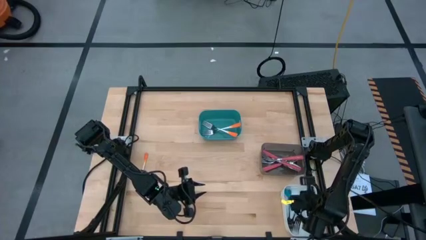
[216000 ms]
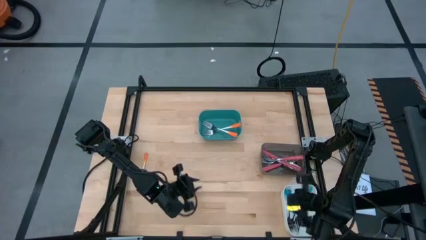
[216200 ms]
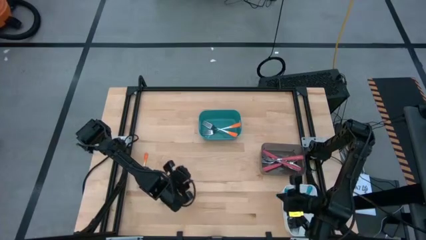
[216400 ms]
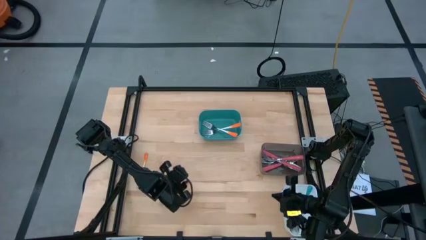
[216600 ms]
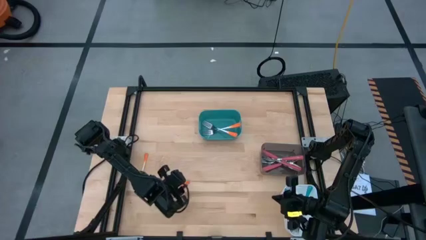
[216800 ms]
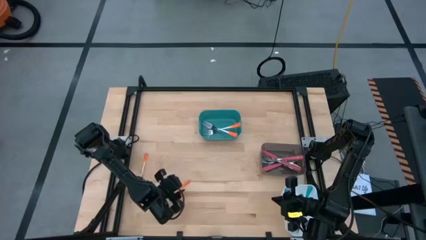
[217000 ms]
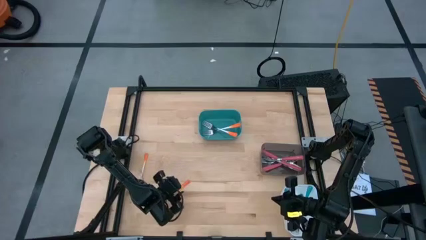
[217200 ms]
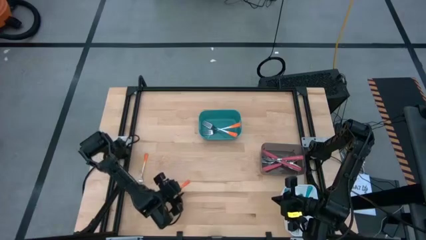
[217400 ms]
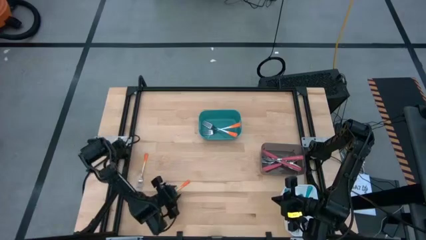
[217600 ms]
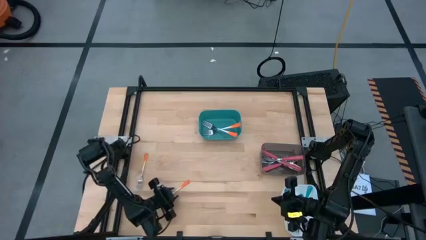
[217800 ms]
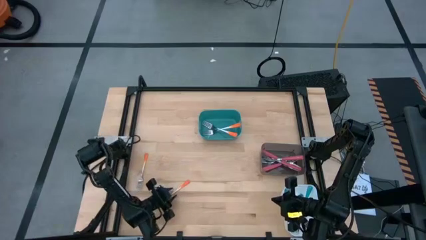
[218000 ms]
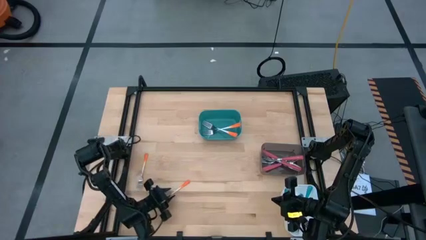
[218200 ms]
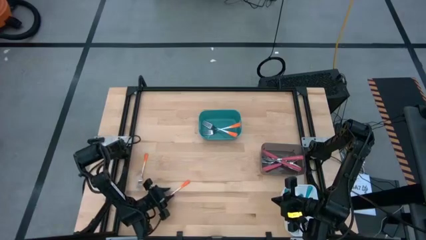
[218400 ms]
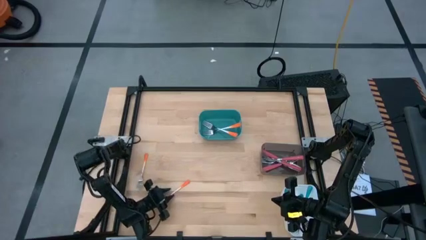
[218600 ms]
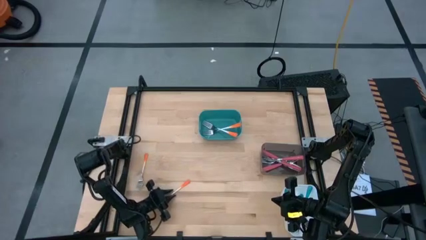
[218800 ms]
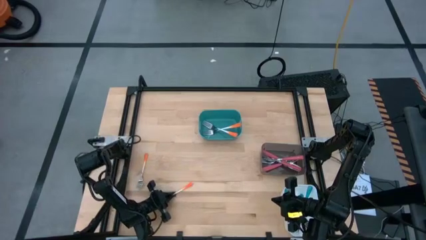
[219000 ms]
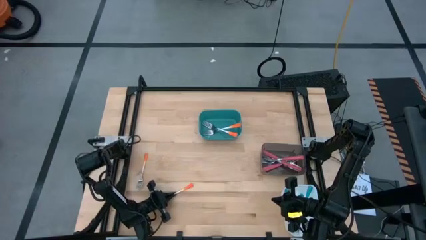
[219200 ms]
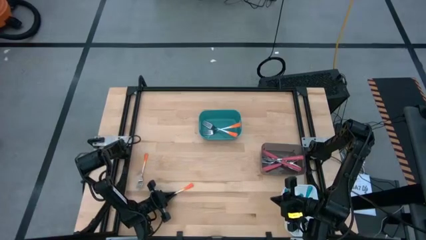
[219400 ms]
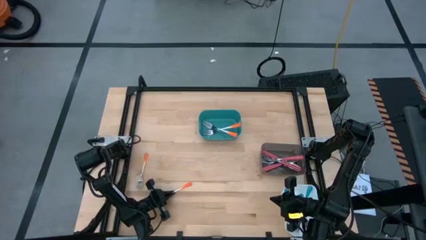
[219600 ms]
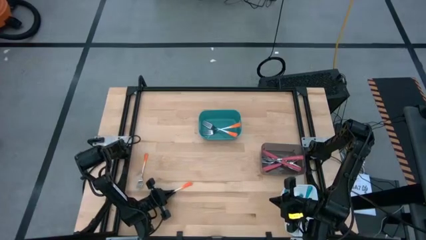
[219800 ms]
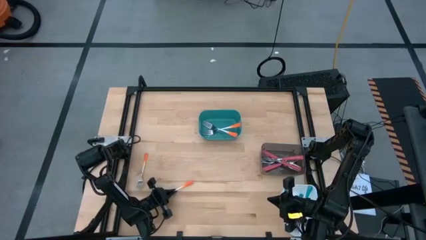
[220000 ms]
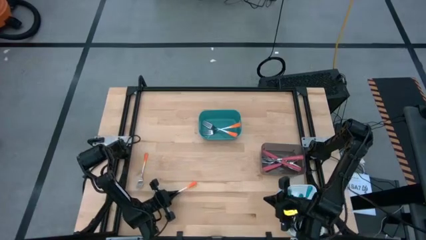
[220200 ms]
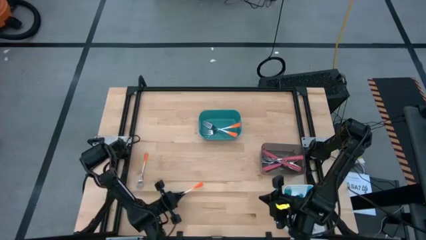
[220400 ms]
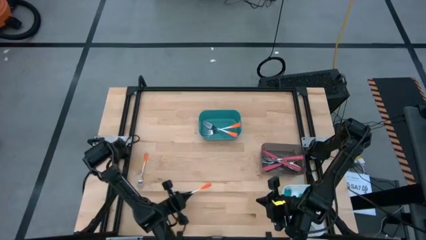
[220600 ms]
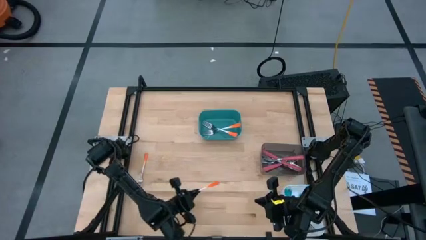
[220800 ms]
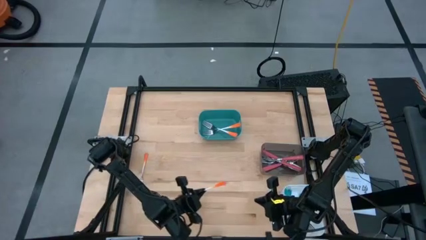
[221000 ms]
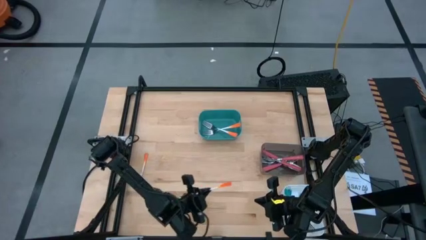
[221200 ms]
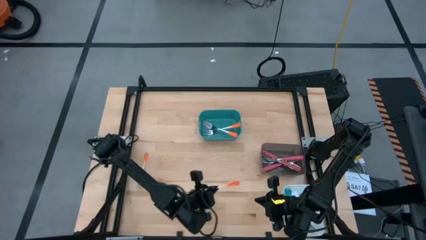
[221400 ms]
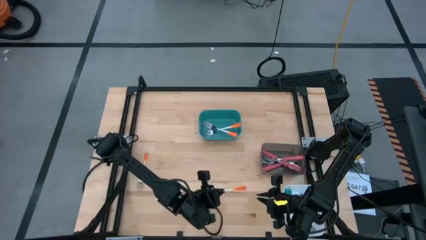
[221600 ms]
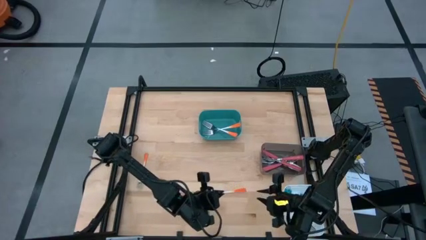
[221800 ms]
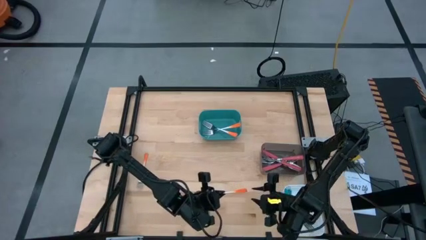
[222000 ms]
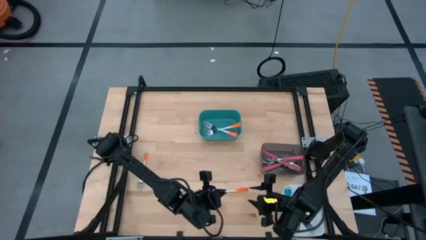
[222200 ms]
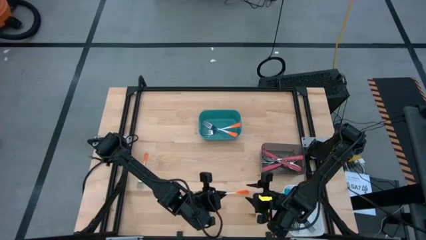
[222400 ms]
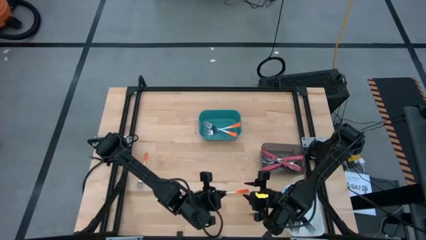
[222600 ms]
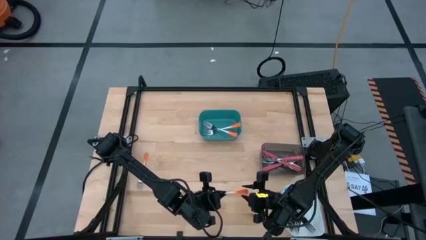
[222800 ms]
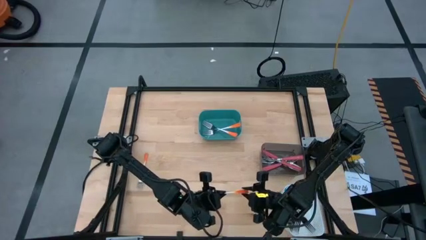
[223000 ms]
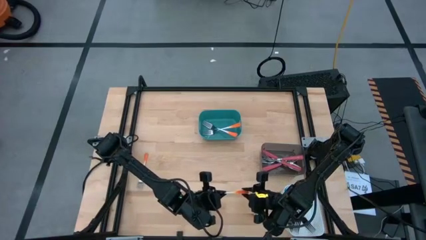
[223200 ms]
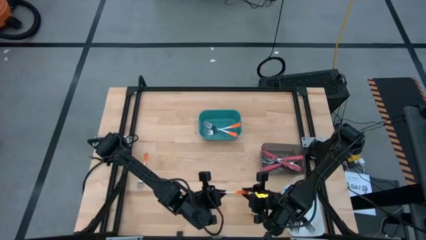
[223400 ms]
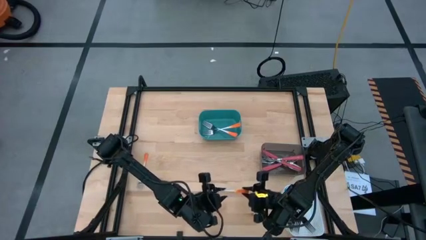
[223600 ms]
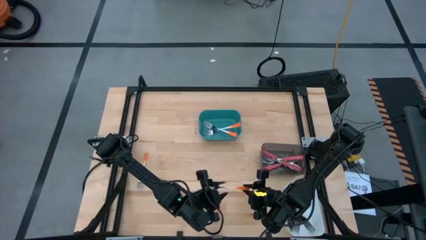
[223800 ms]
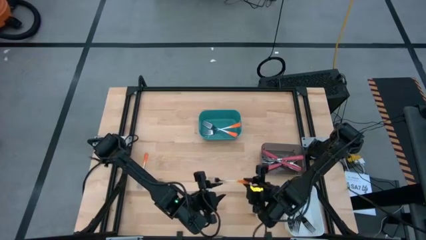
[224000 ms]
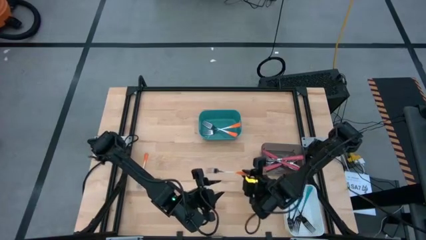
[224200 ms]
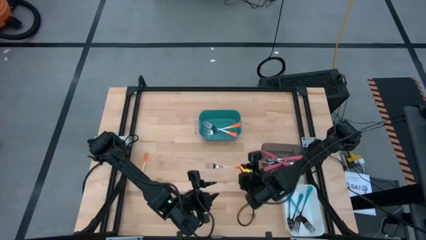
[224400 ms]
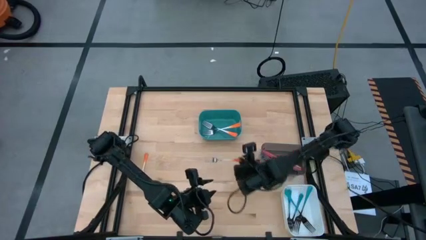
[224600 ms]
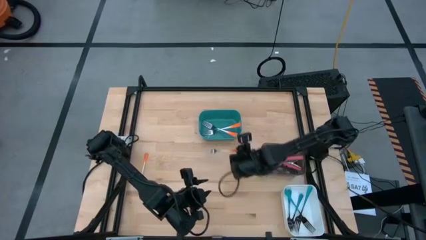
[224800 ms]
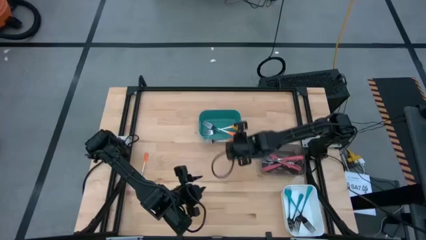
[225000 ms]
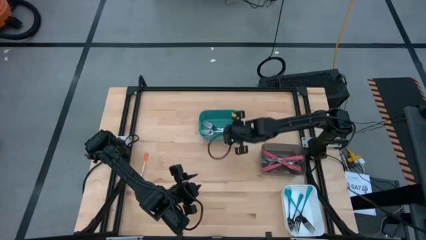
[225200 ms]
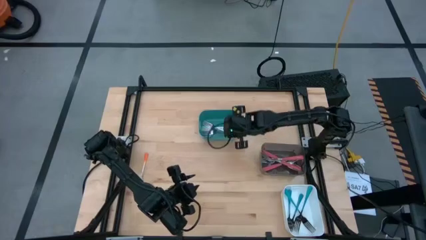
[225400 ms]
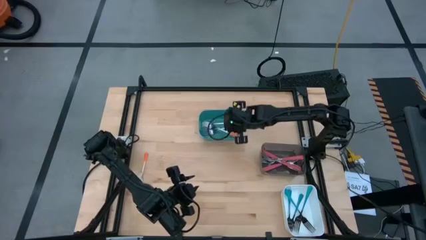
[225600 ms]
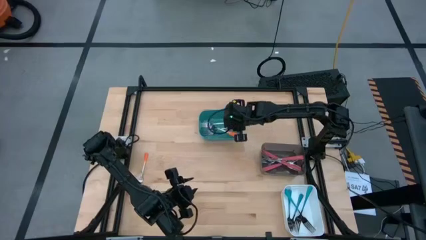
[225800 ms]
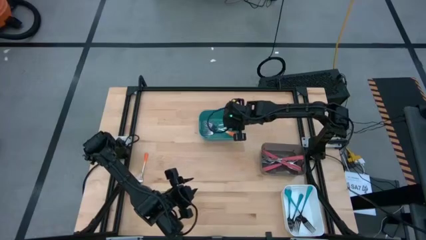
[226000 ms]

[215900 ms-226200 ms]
Task: Sort silverware by color (type)
Put the orange fork into the blue bin

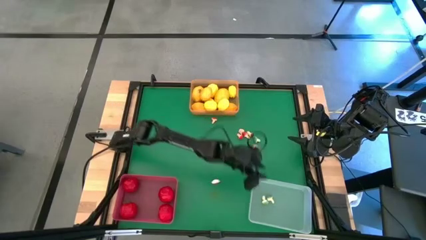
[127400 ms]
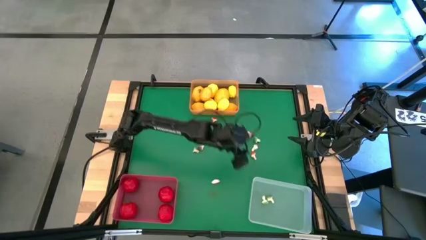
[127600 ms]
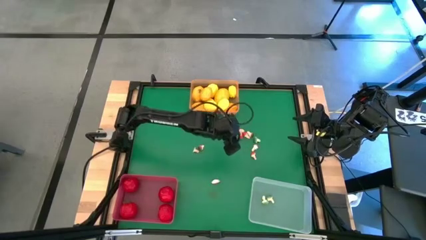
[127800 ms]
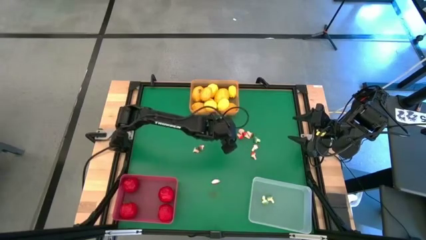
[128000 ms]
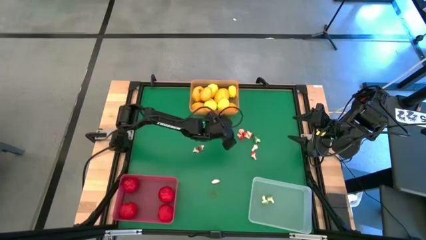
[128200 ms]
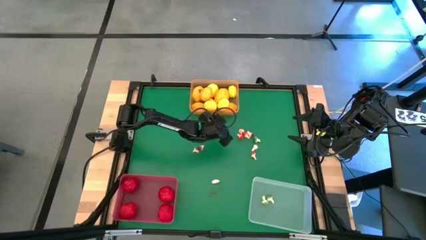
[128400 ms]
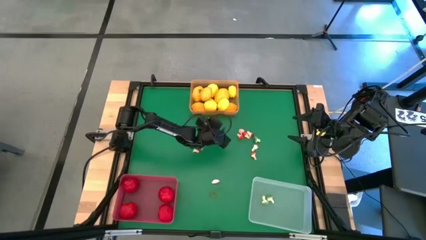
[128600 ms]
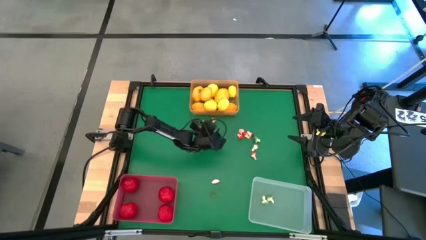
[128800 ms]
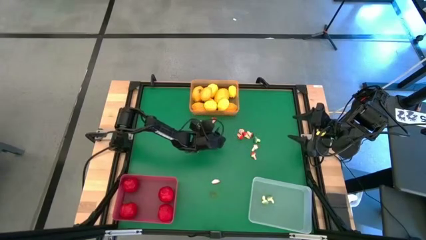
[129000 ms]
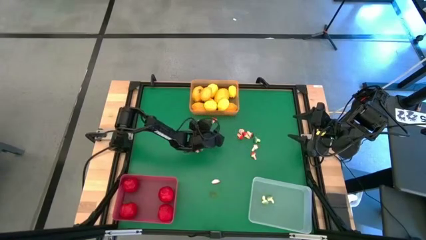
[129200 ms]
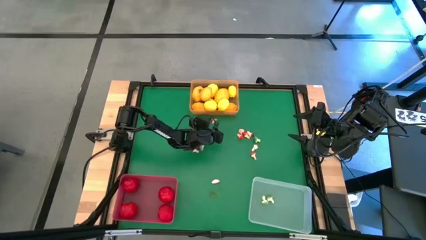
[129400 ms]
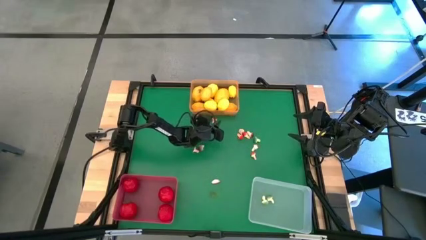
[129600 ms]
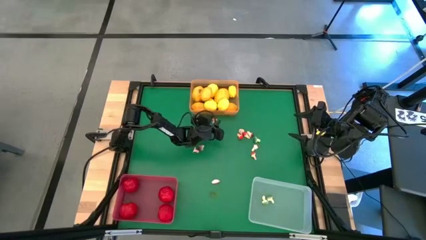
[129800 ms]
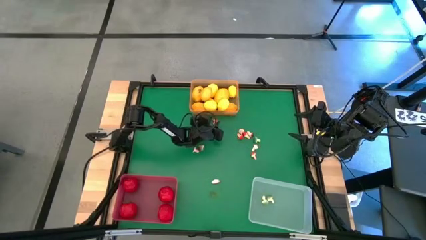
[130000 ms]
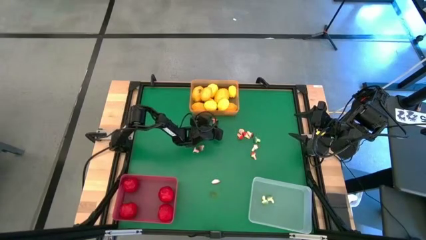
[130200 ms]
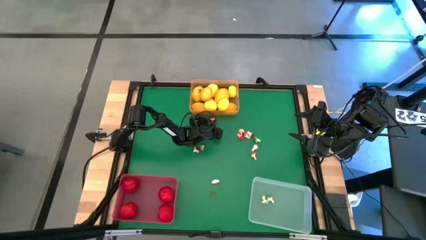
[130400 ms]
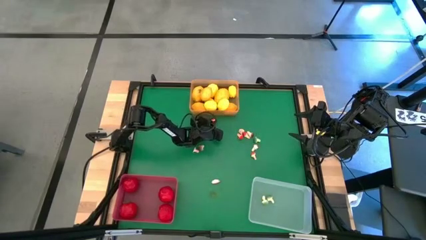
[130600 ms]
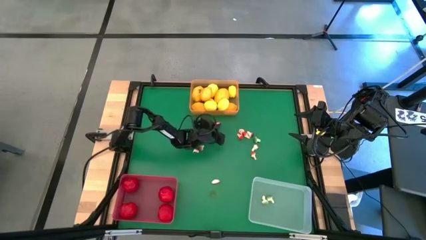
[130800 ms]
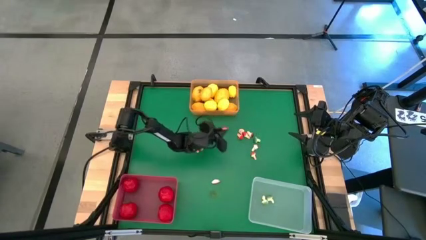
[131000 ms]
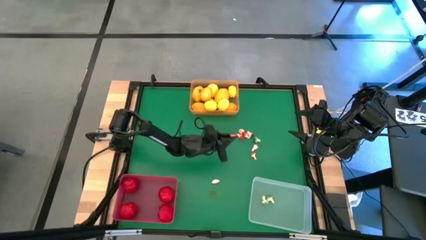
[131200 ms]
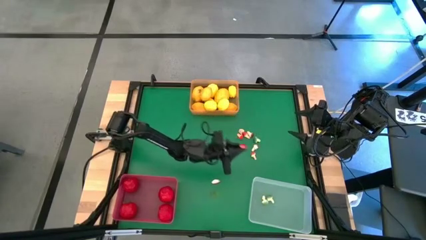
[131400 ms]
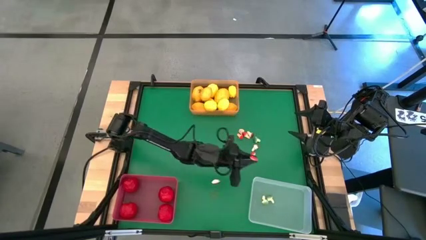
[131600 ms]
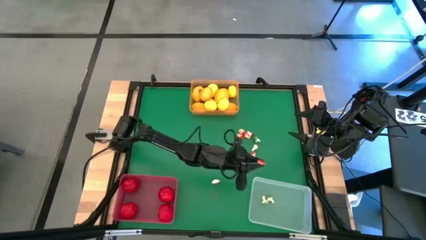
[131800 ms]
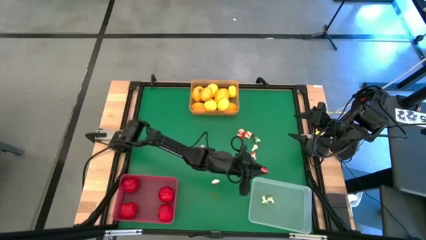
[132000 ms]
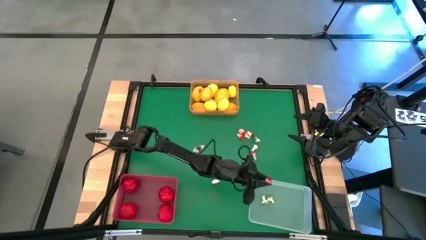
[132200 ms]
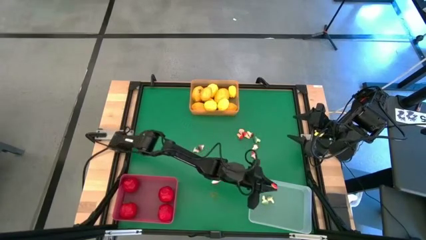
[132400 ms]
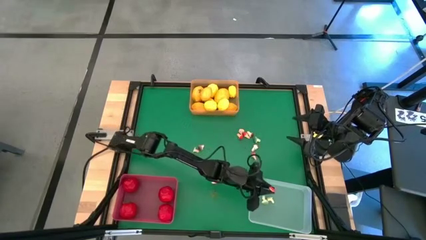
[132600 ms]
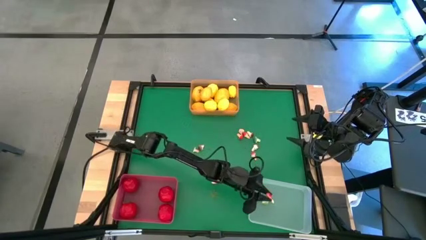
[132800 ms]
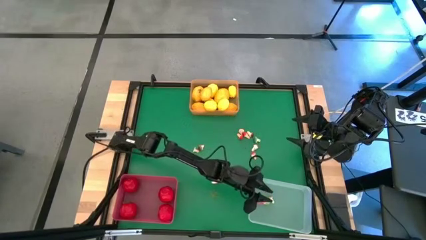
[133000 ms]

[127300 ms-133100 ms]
Task: Sort produce into baskets
Put the red mushroom into the transparent bin

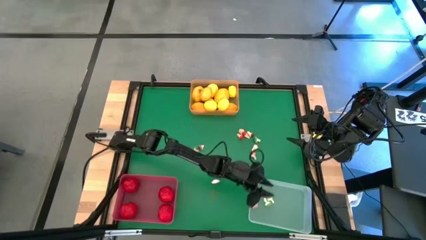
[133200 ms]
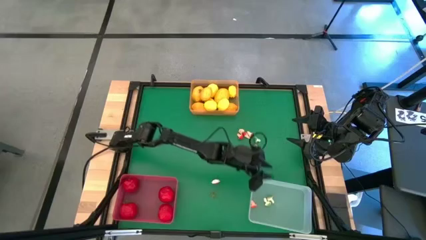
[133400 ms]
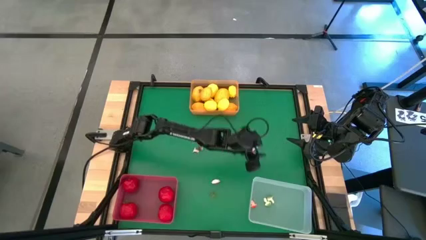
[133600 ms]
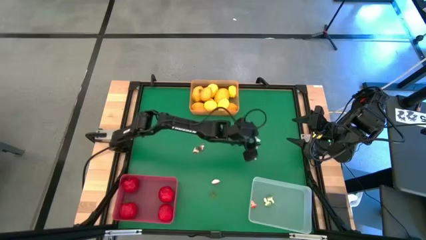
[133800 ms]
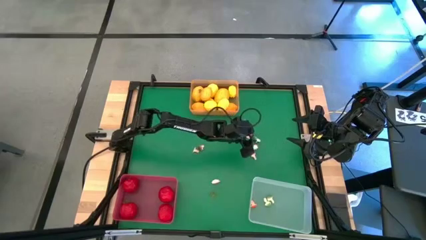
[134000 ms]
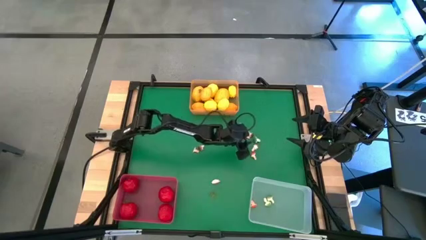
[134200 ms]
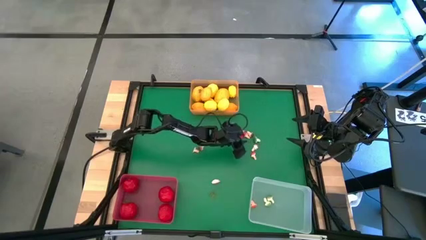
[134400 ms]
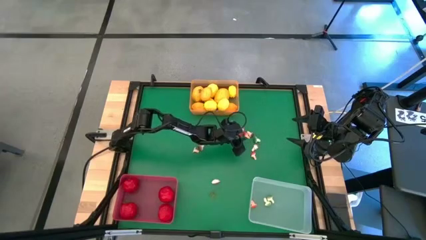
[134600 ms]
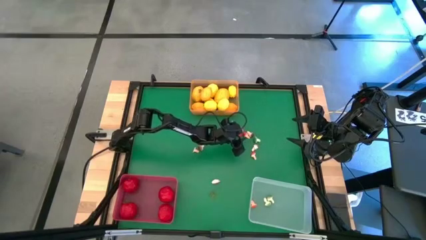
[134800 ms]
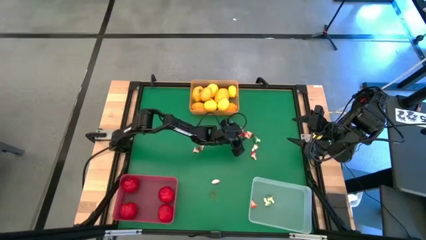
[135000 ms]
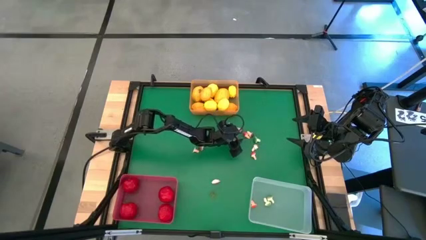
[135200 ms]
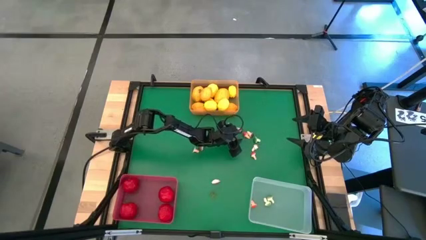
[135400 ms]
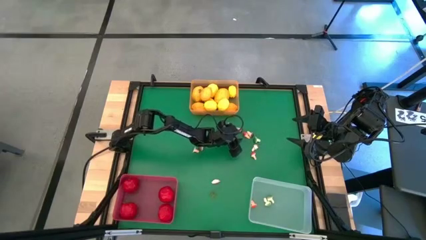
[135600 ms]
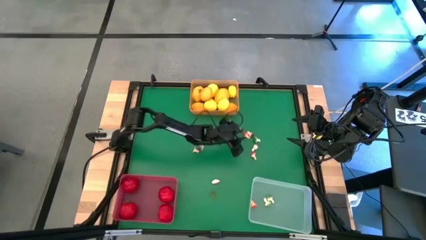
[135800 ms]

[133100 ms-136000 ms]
Put the red mushroom into the transparent bin
